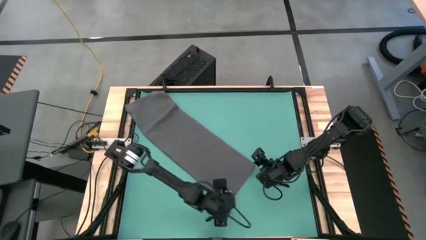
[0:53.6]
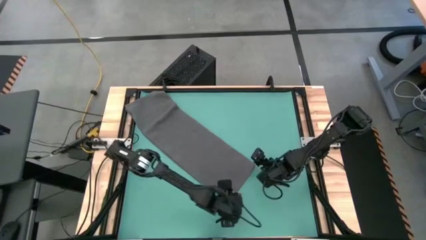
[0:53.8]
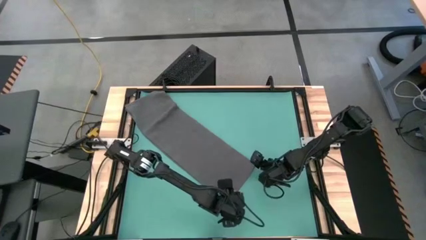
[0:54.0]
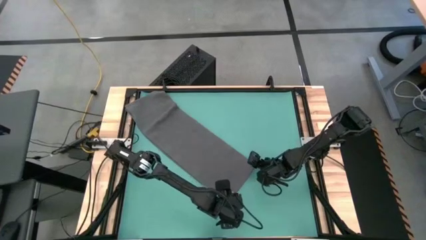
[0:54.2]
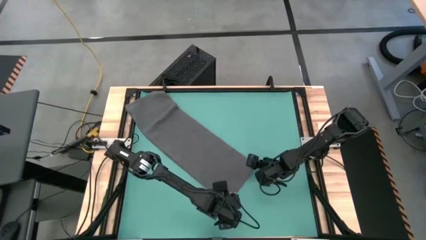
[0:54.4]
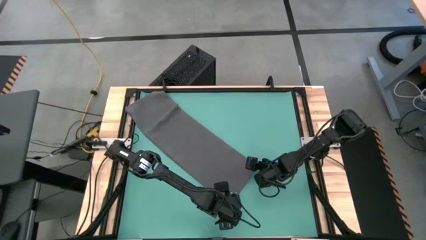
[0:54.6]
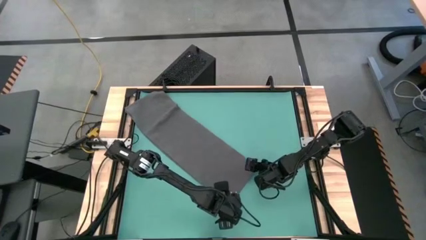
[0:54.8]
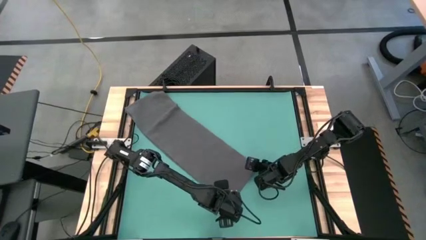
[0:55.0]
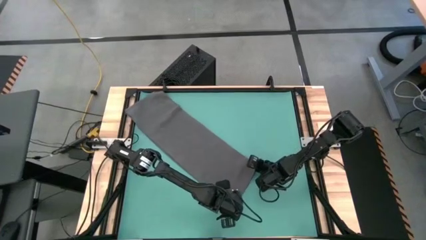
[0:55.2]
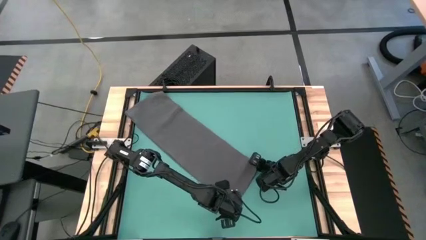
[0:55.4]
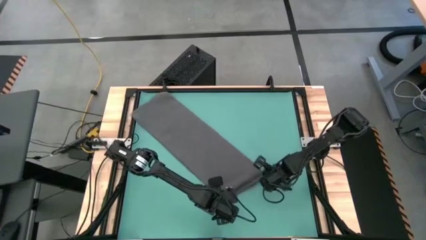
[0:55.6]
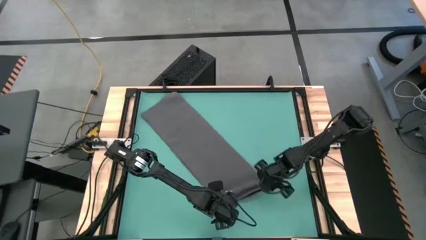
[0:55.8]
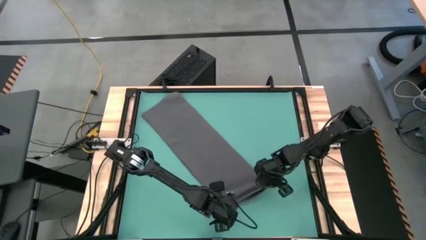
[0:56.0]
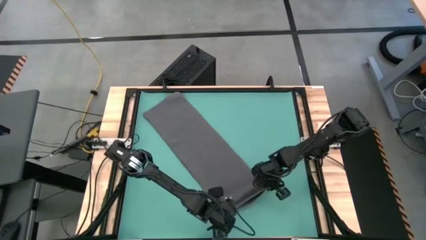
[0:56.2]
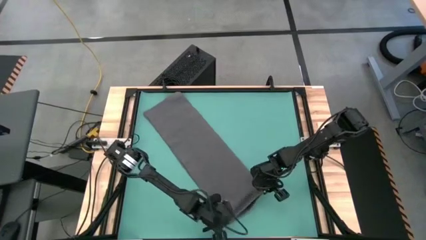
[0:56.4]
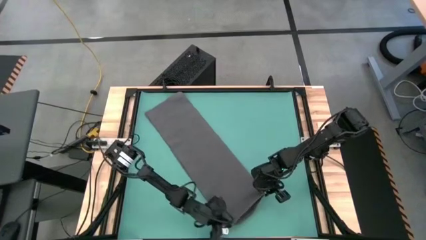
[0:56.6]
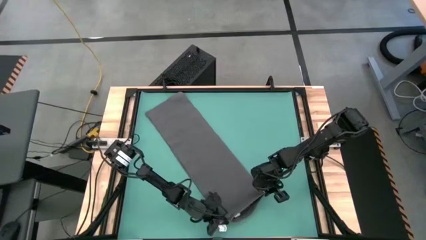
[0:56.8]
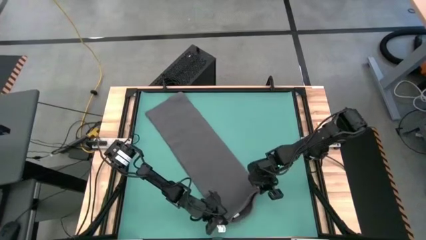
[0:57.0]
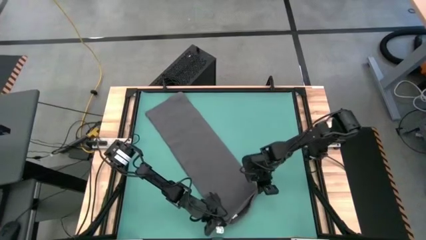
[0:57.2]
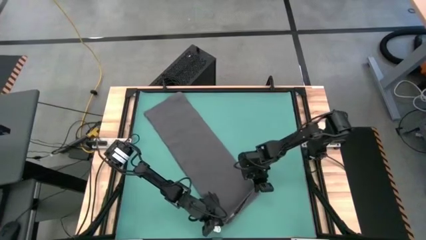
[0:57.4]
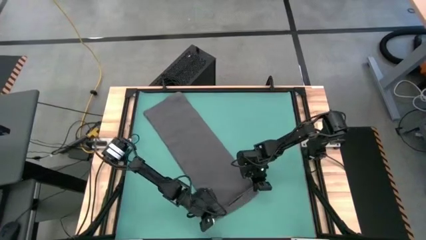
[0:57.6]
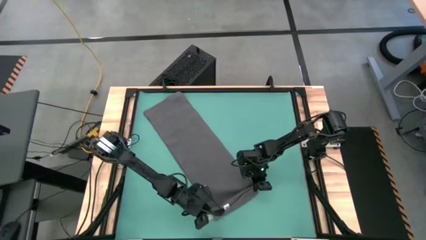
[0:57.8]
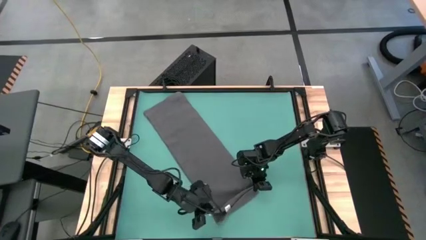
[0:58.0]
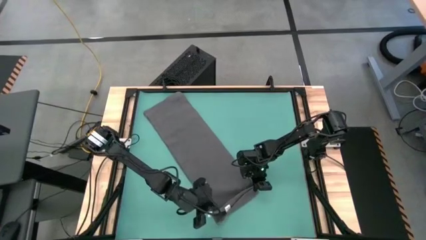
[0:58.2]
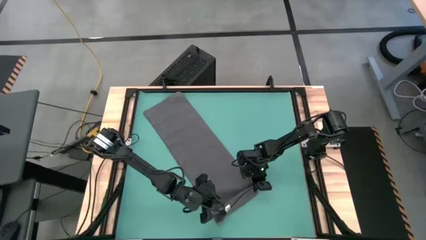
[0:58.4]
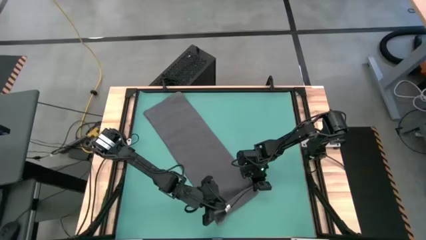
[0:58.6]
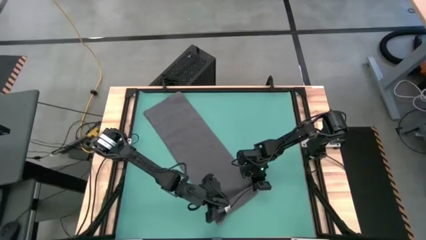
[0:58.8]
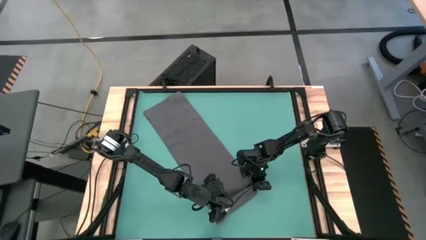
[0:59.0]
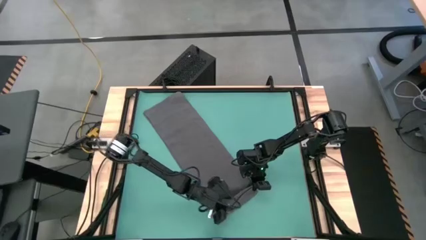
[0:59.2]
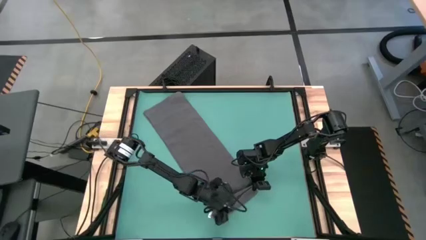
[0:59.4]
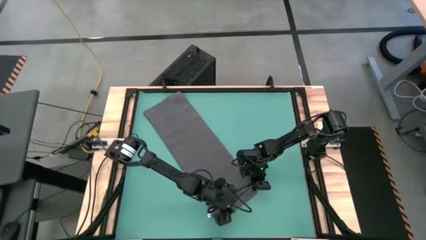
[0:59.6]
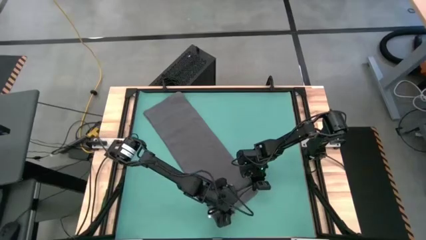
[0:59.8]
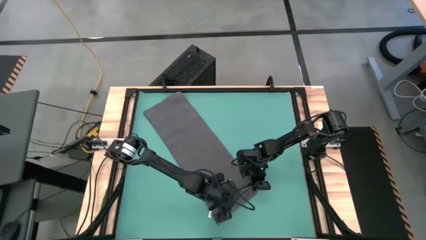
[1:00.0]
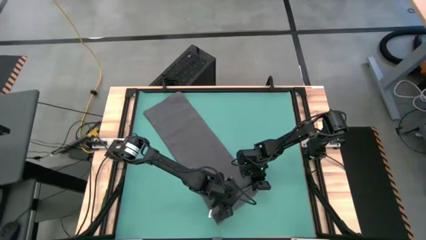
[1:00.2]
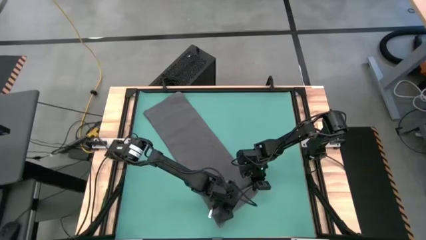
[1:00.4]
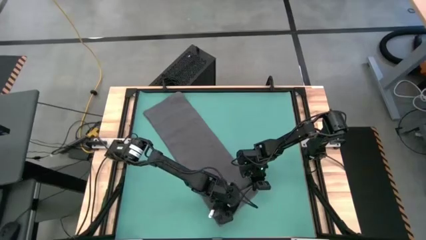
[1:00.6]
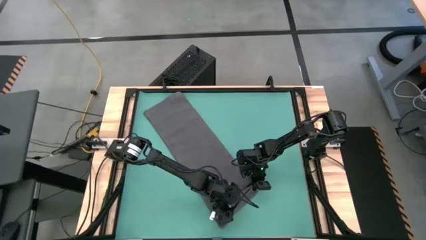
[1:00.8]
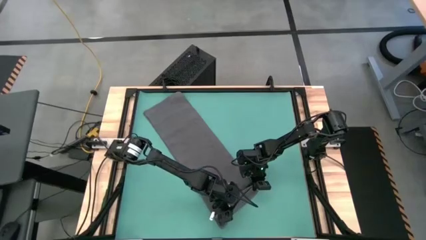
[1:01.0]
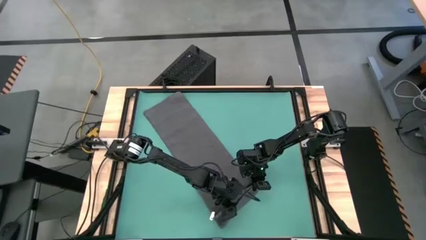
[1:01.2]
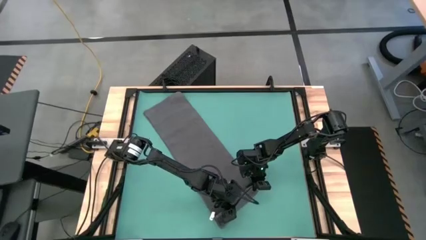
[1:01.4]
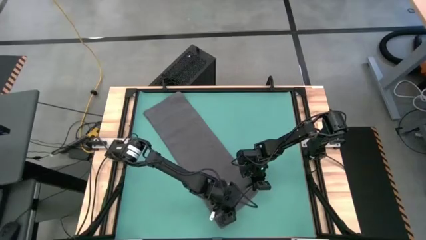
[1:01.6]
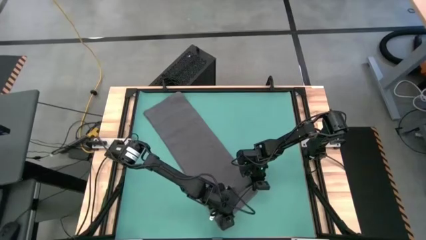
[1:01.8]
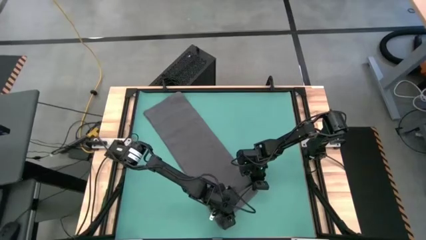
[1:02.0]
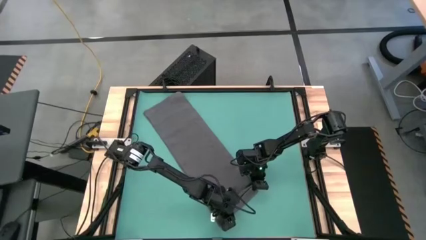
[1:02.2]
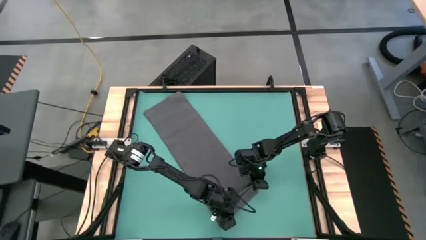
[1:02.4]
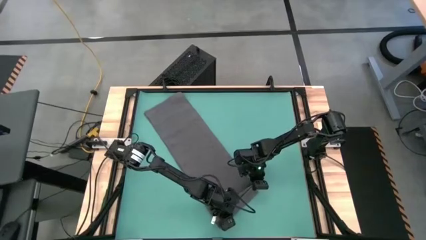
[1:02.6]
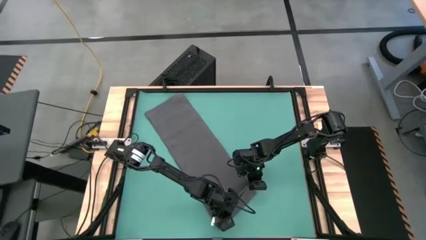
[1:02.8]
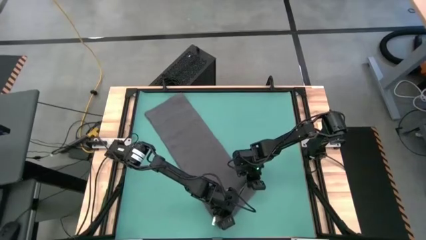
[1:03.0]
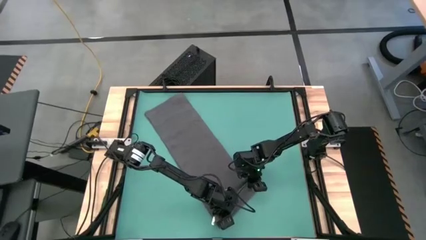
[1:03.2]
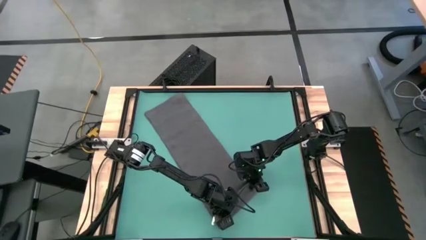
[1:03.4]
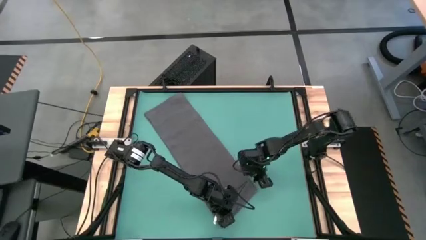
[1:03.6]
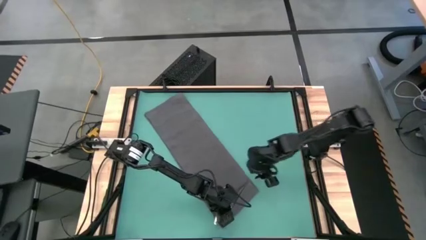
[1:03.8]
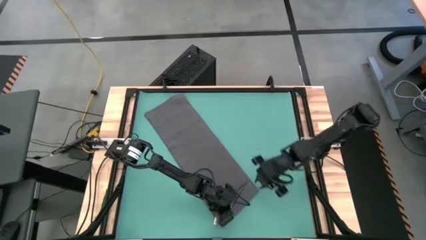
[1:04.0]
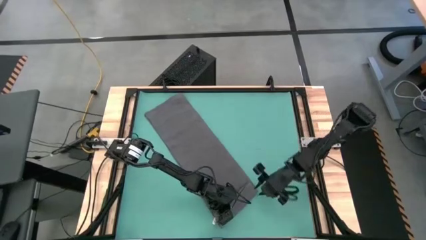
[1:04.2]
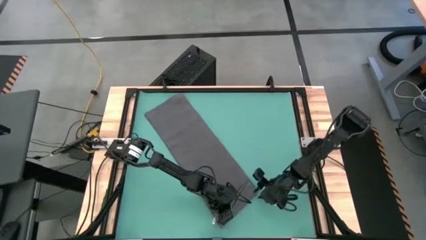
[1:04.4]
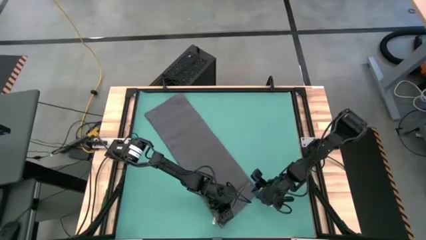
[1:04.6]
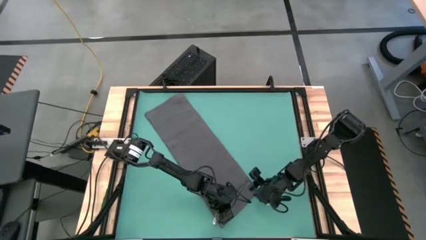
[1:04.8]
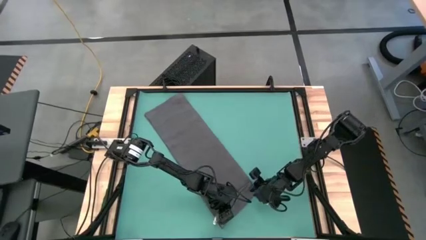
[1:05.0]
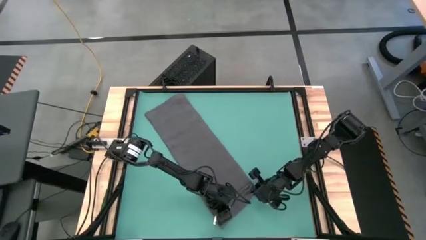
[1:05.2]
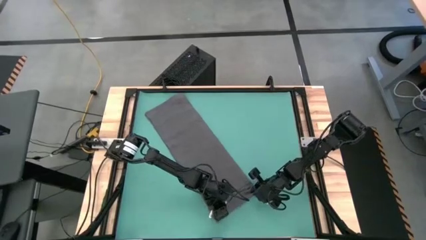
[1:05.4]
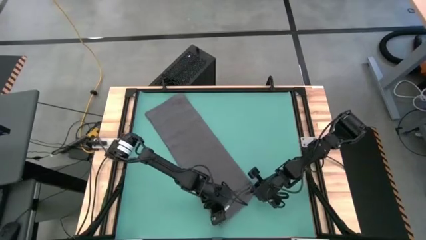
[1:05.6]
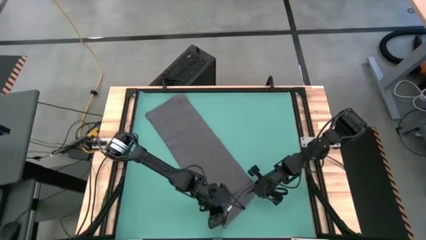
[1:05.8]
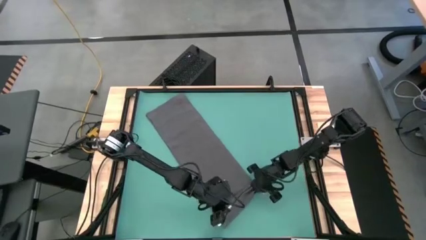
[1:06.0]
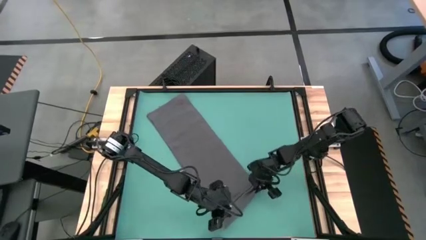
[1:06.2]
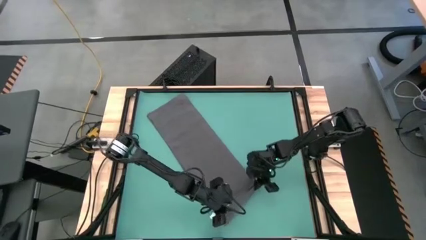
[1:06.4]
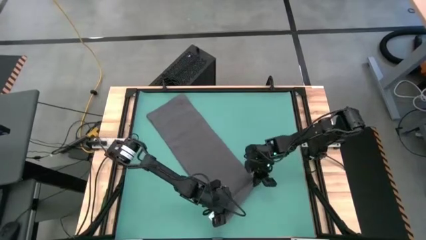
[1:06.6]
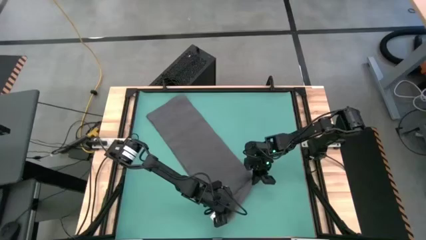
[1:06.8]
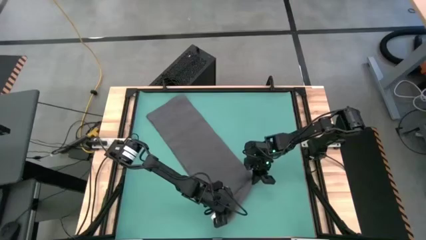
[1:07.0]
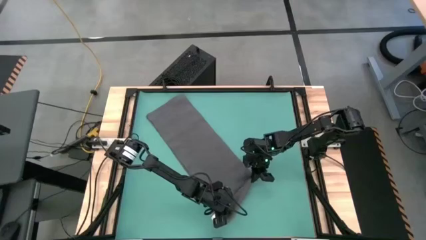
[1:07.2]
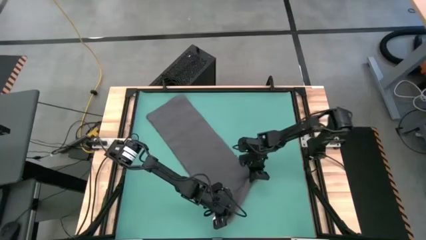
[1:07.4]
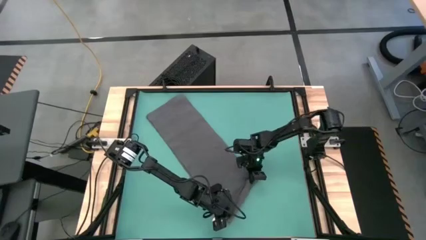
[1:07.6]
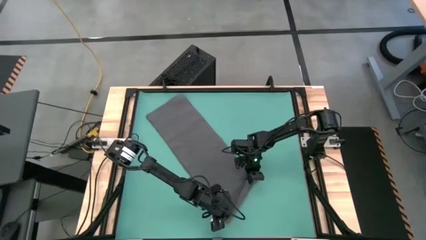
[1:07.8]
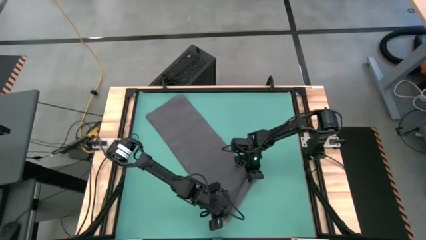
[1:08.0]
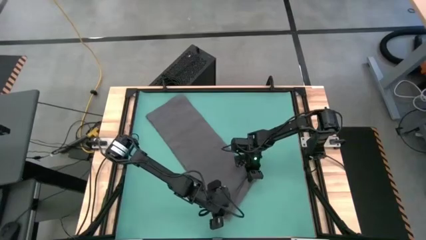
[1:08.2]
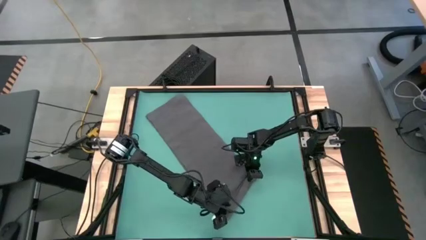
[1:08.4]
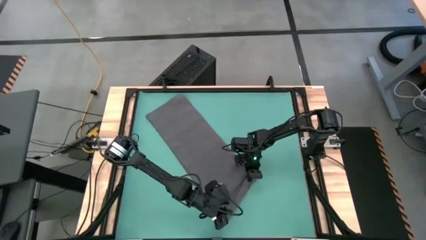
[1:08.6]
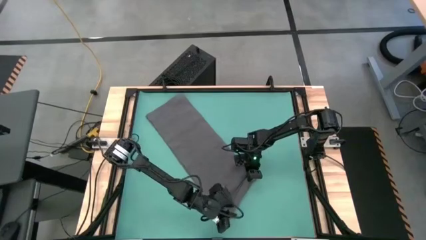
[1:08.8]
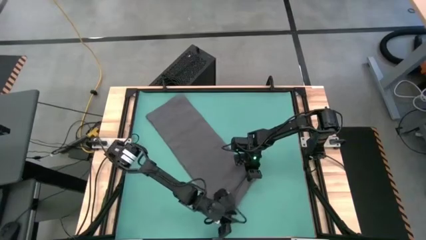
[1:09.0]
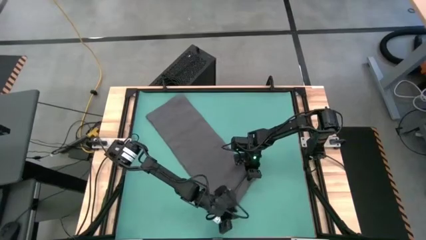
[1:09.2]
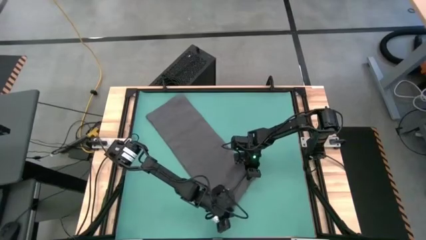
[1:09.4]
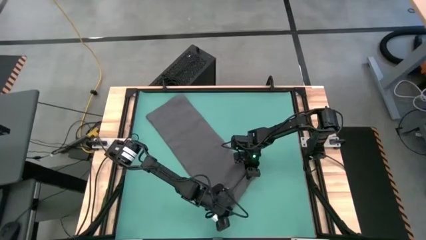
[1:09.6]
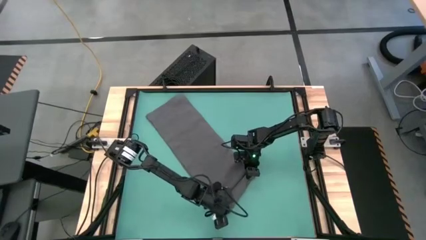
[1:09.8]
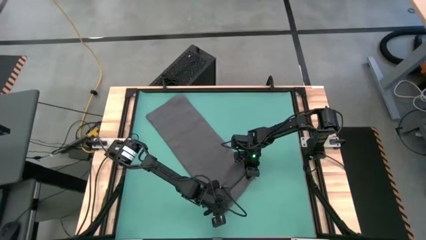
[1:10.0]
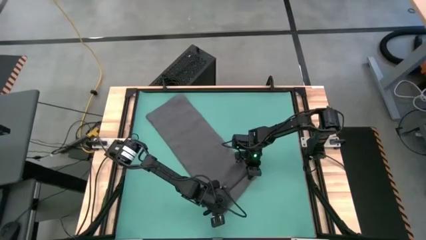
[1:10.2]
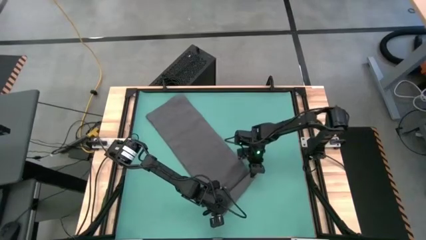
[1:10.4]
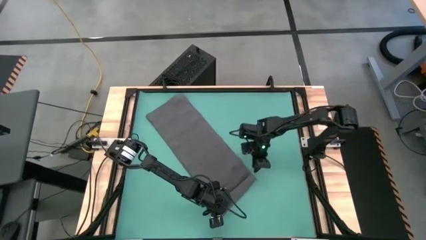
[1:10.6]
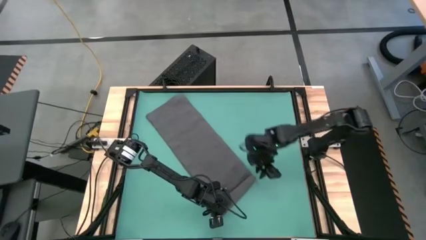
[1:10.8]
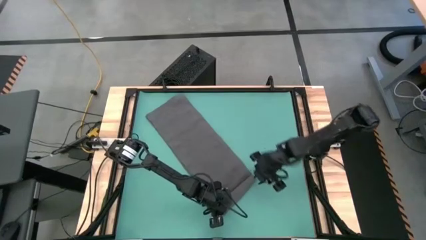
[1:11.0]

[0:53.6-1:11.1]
Task: Roll towel into tight, uniform cylinder
Roll the gray towel
